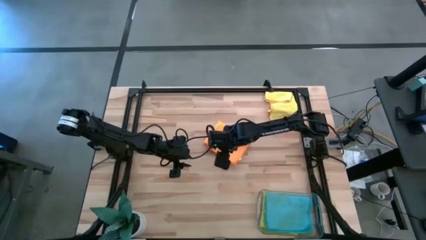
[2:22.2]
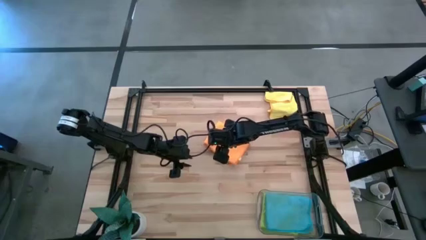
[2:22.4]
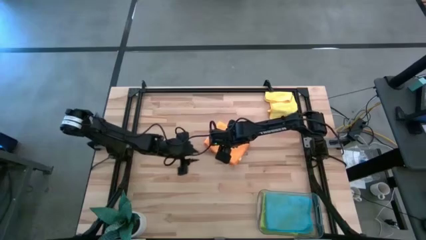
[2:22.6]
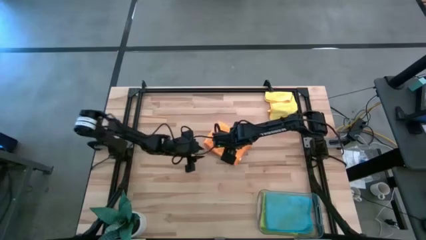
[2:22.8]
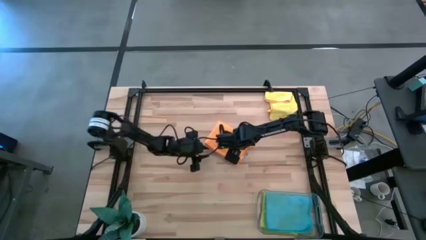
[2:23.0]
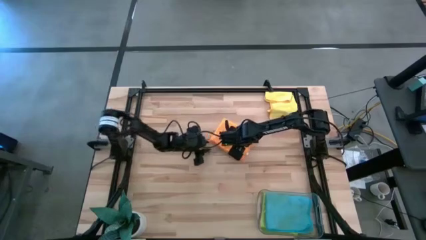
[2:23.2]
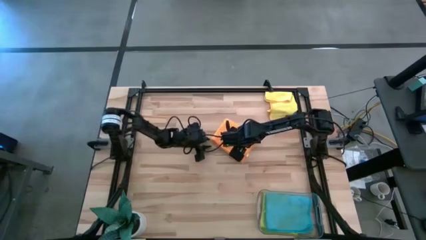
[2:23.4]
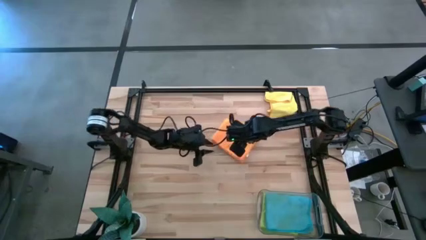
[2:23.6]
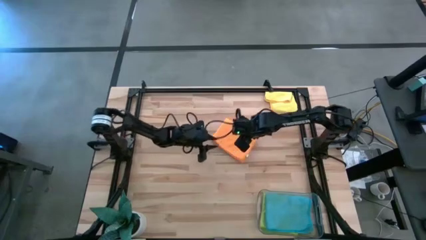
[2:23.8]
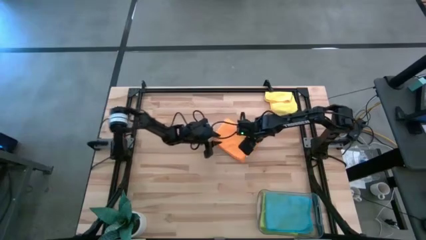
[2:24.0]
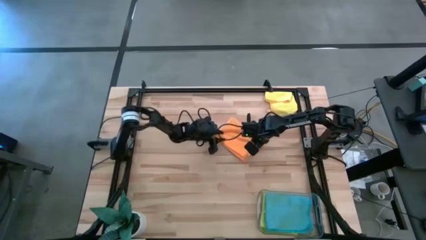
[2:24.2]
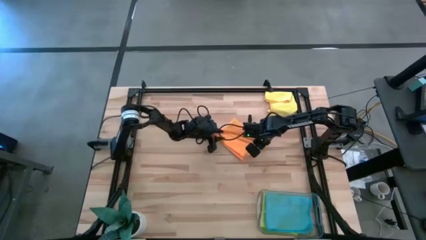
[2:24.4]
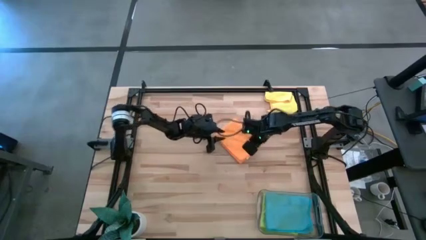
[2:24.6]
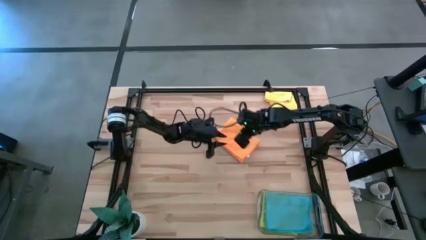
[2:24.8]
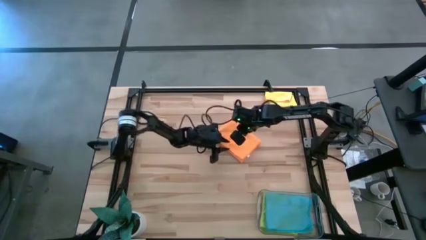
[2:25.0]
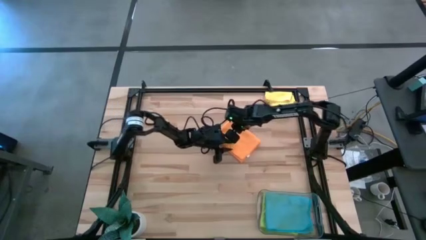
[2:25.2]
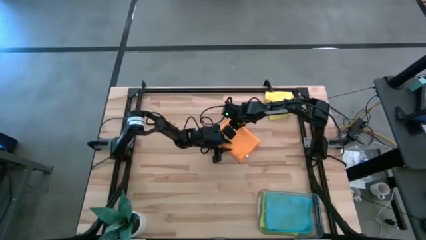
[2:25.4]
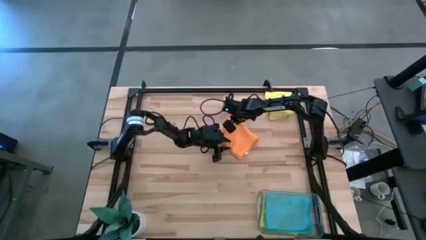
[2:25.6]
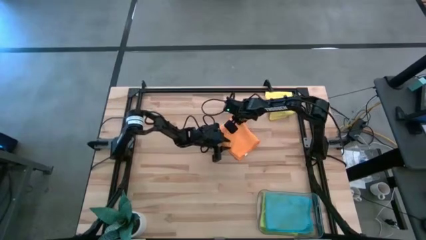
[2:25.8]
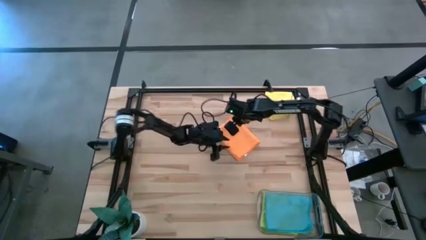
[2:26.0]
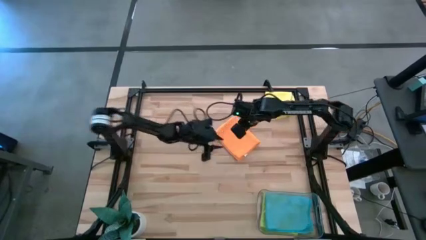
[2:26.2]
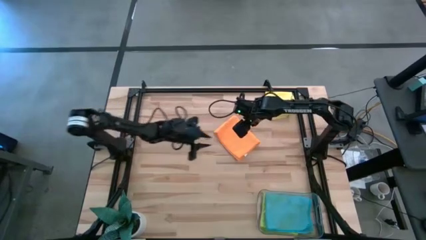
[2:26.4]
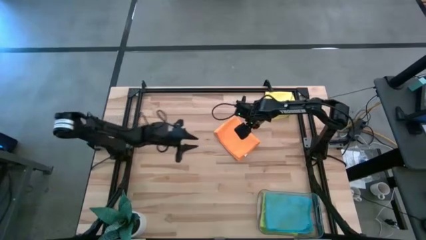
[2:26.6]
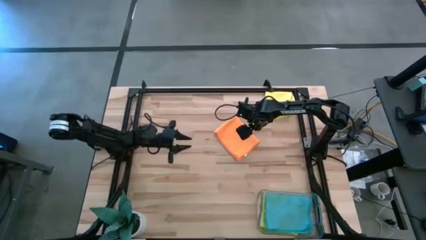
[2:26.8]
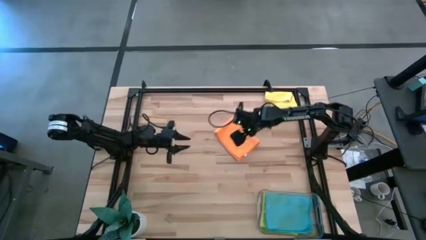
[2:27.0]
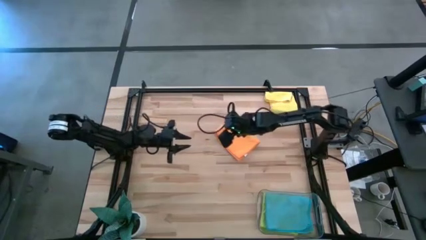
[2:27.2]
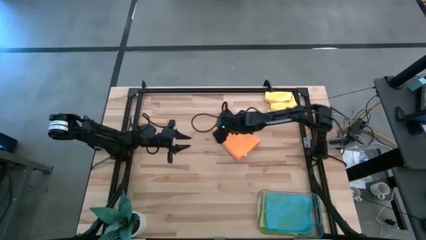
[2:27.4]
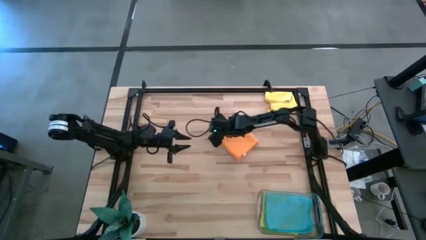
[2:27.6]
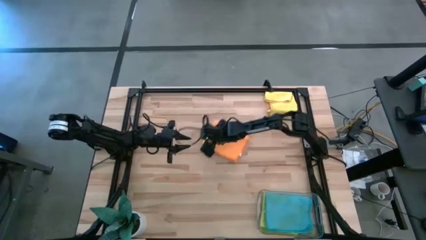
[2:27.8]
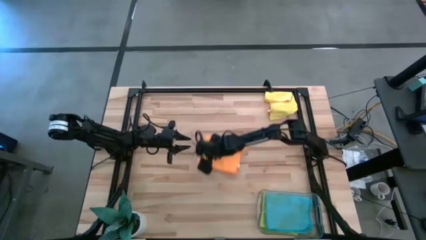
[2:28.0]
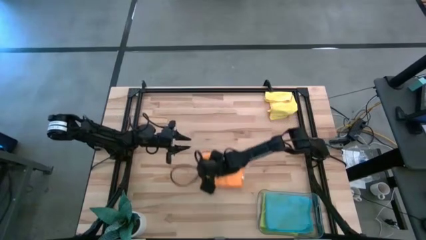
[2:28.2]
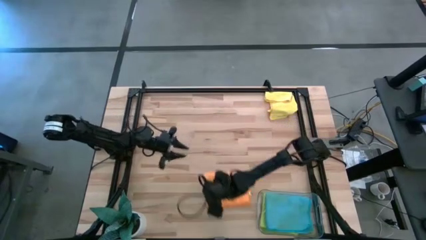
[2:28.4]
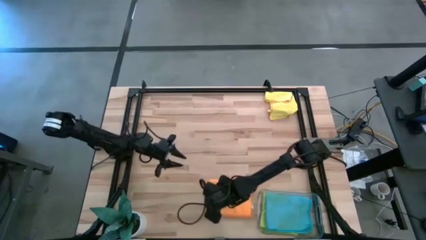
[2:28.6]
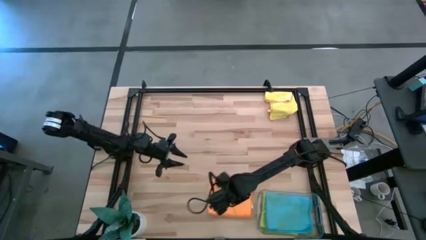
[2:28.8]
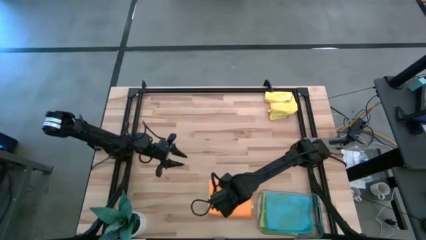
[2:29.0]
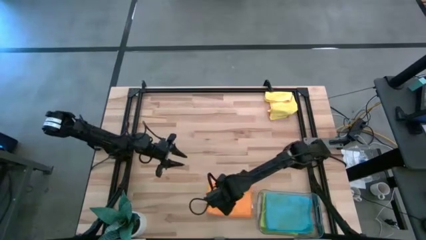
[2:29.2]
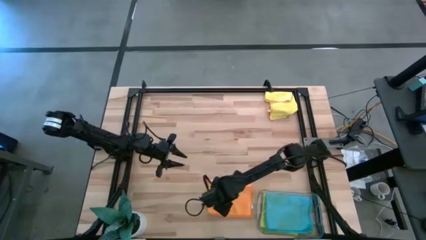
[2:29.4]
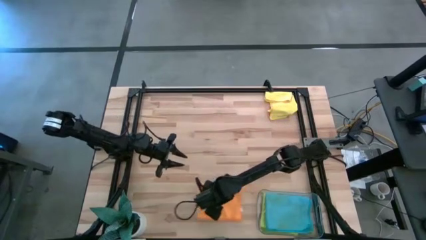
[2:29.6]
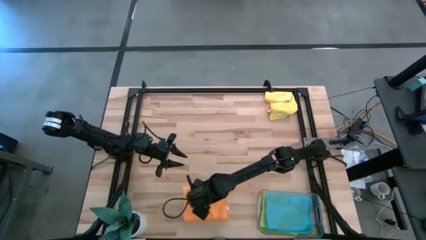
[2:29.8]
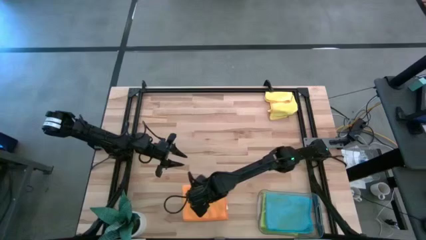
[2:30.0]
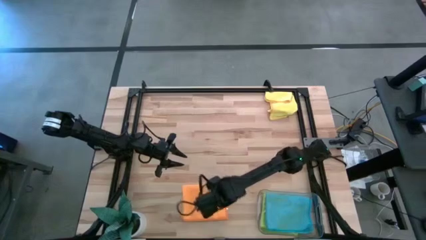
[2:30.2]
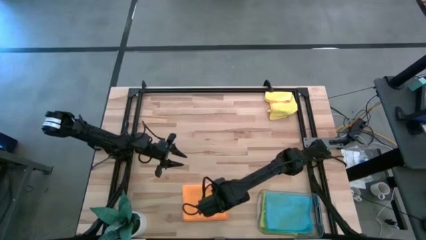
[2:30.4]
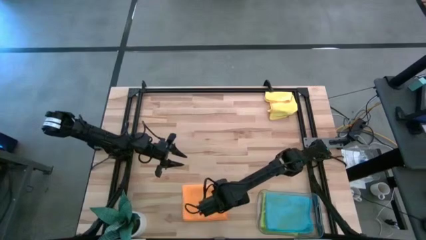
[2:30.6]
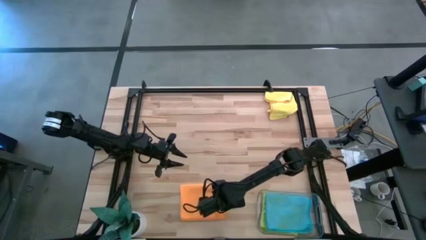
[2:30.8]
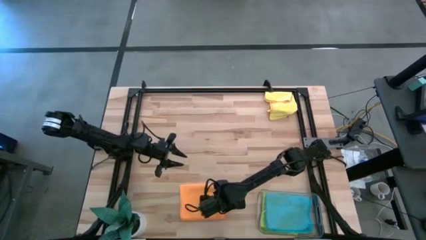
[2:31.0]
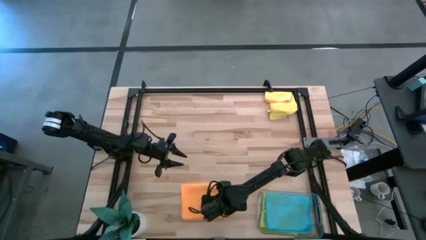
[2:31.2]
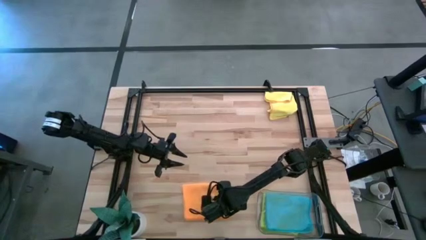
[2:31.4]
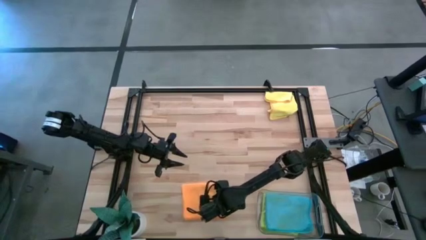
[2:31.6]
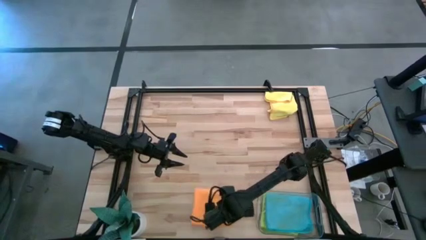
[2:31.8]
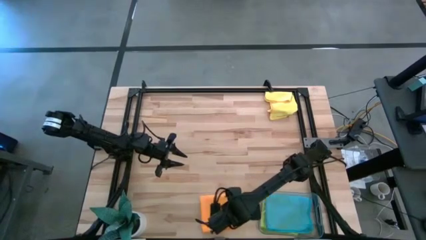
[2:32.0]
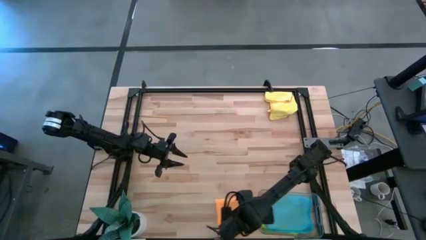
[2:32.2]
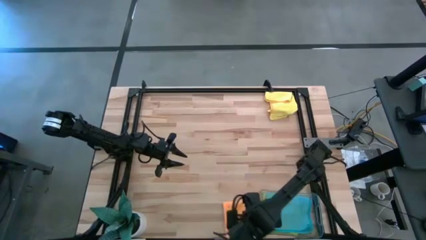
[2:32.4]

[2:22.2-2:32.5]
Task: Fold microfiber towels
Put the orange towel into the transparent bin

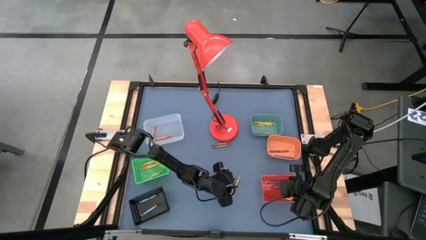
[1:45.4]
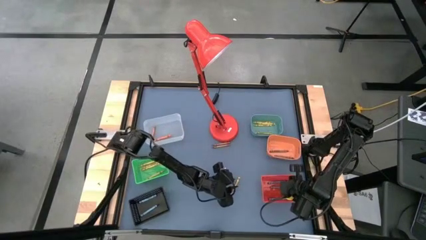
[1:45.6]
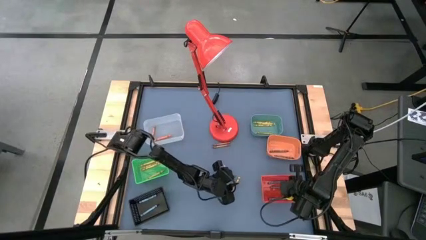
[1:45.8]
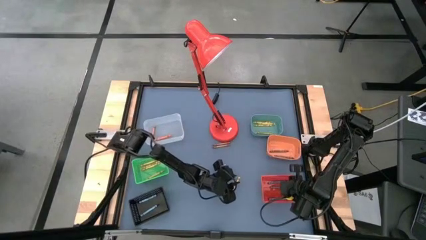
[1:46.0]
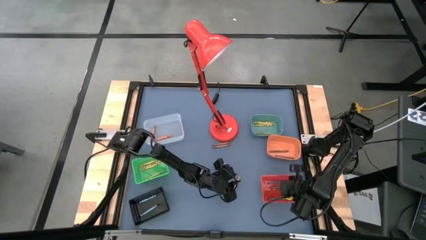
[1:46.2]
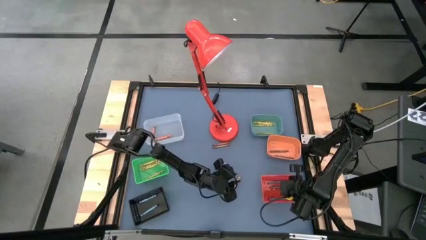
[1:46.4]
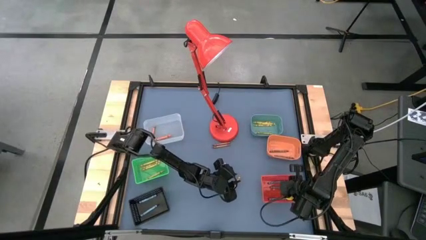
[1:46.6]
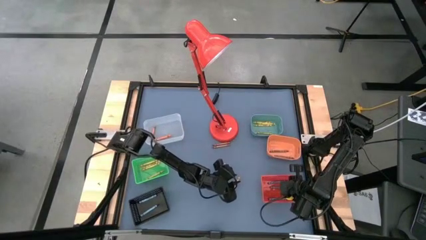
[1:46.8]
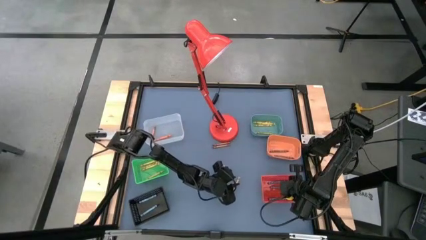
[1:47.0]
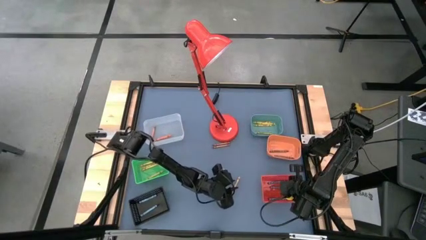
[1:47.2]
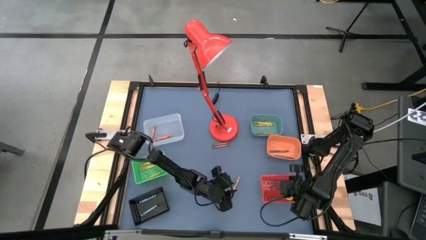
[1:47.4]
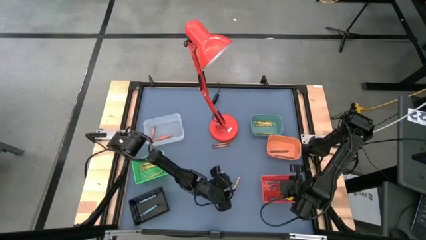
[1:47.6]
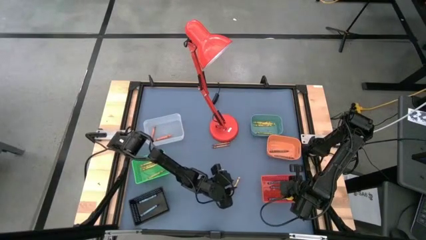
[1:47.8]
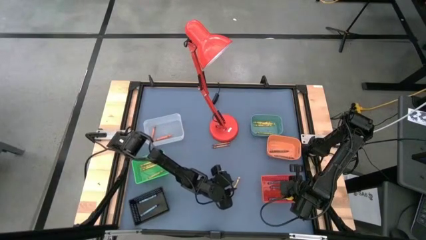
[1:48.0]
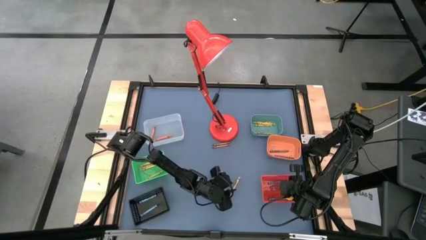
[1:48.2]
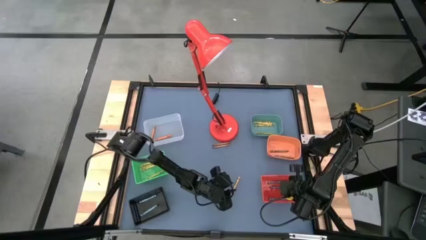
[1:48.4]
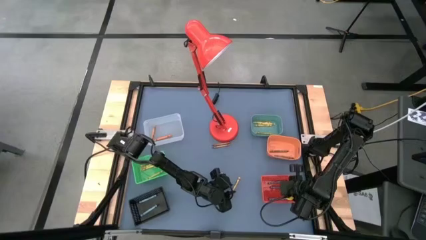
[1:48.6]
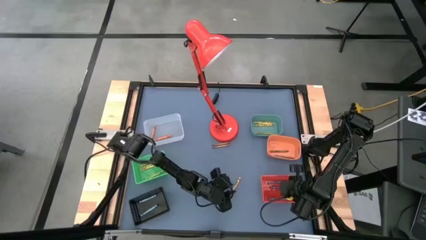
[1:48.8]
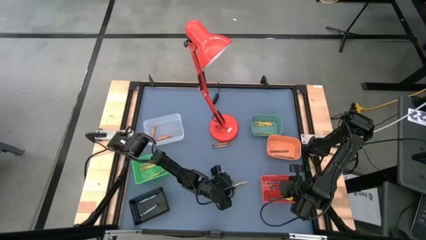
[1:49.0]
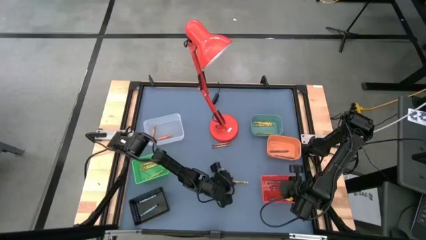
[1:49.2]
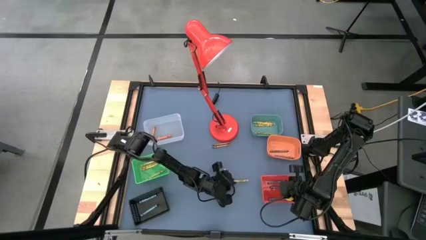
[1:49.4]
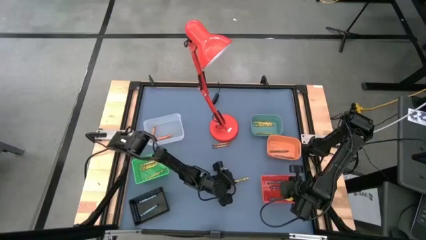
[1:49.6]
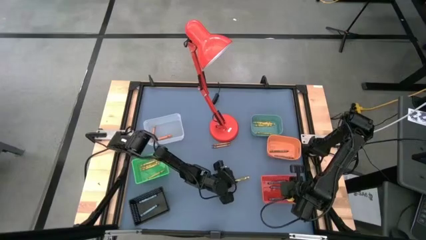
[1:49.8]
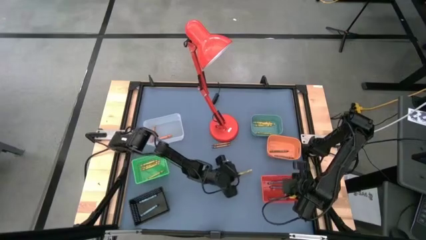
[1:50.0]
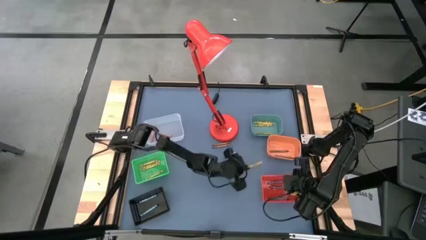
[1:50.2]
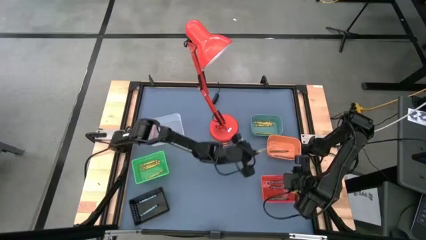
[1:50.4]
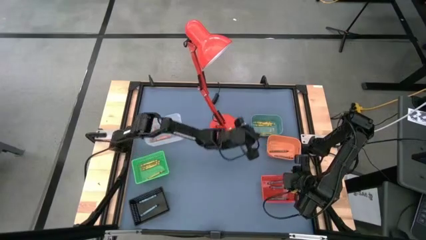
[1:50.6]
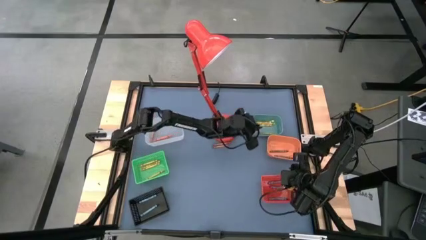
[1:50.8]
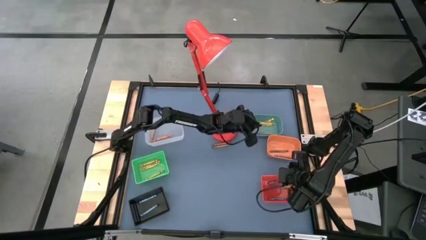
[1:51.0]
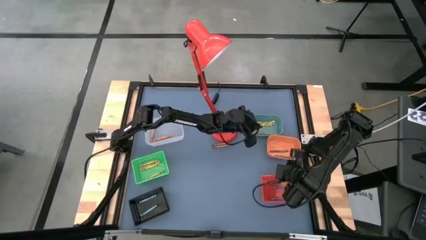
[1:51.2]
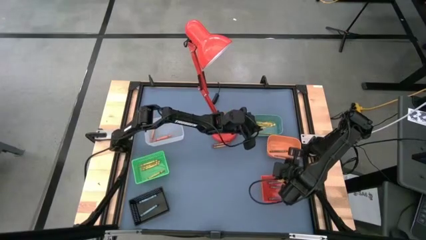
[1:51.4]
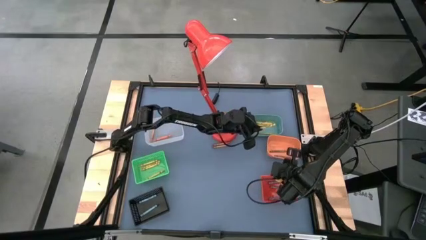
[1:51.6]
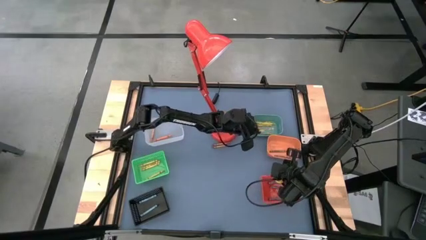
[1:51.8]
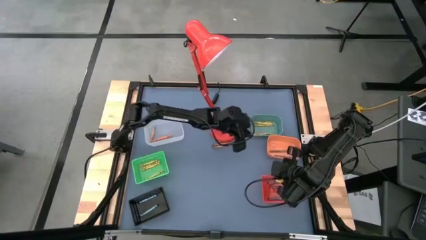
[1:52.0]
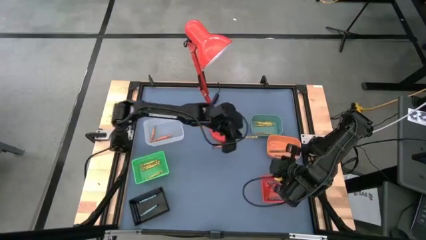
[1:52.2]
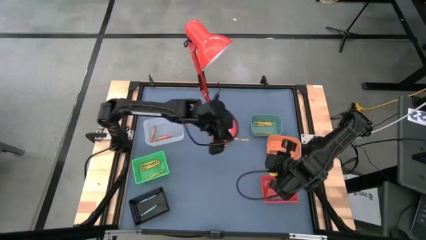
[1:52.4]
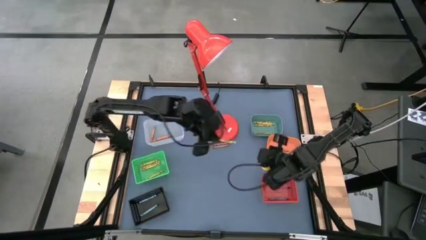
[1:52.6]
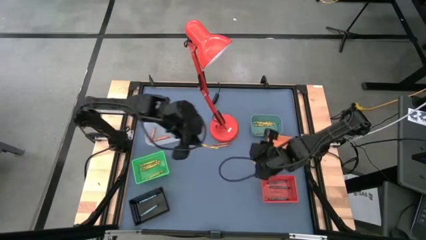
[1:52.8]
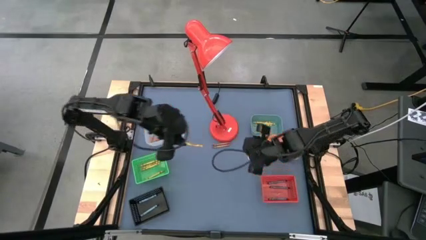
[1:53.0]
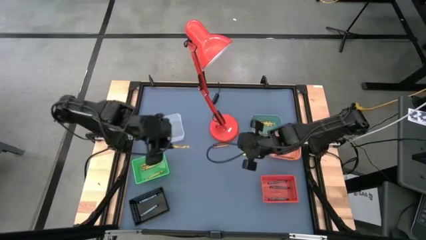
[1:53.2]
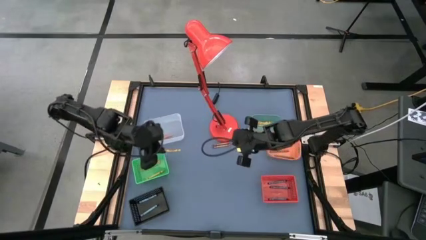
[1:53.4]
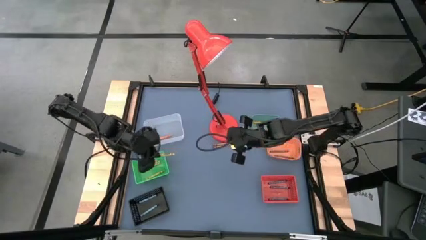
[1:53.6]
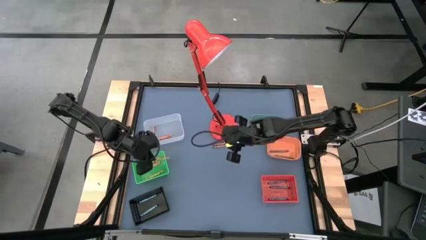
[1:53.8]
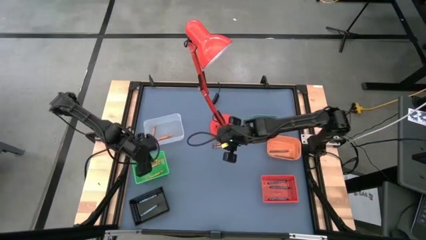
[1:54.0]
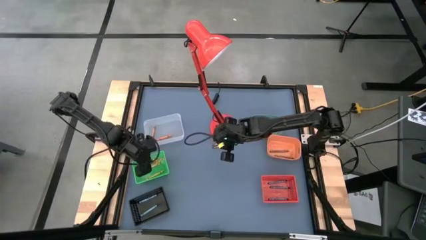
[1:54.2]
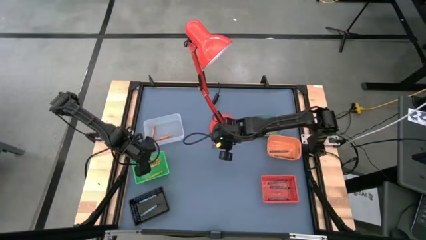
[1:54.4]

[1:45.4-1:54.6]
Task: Sort crayons
Put the golden crayon into the green bin
